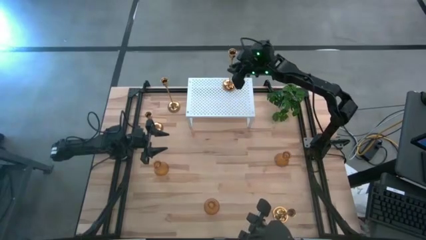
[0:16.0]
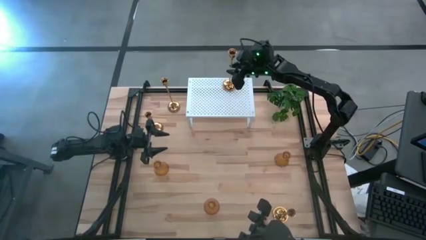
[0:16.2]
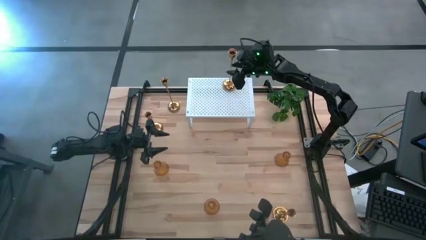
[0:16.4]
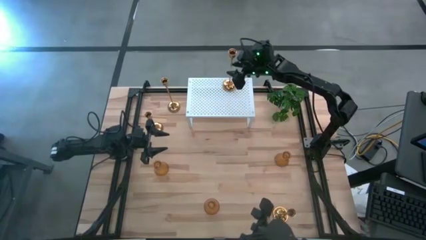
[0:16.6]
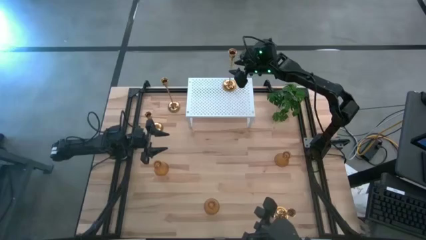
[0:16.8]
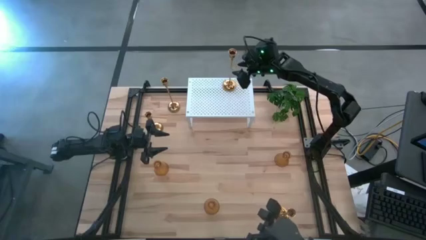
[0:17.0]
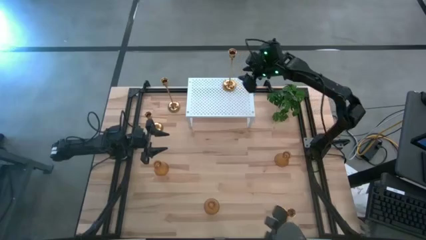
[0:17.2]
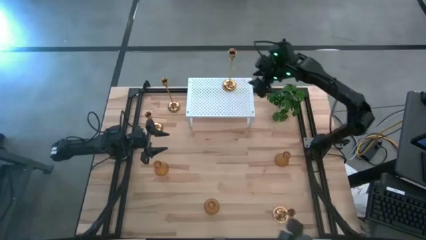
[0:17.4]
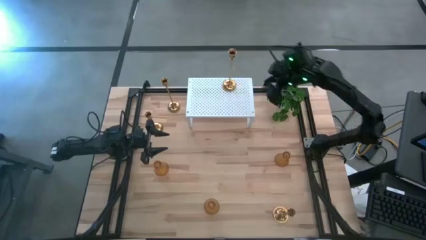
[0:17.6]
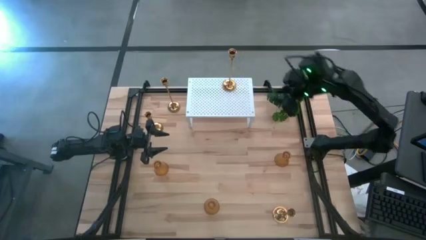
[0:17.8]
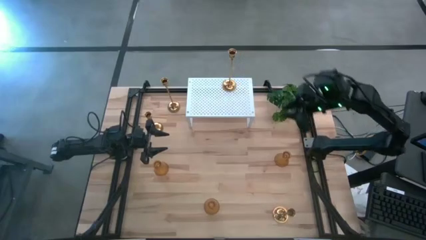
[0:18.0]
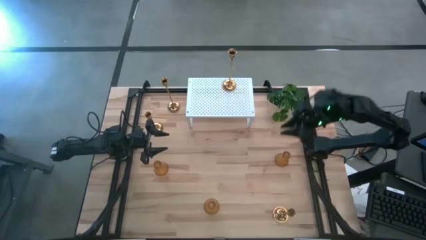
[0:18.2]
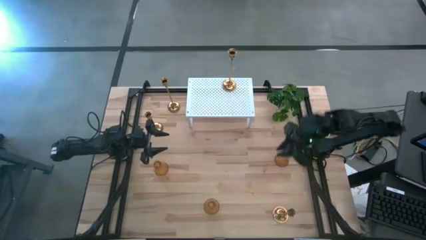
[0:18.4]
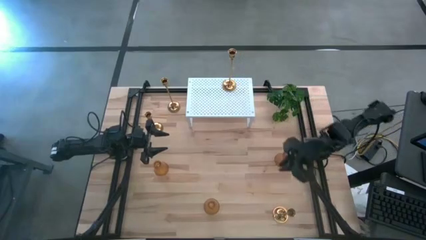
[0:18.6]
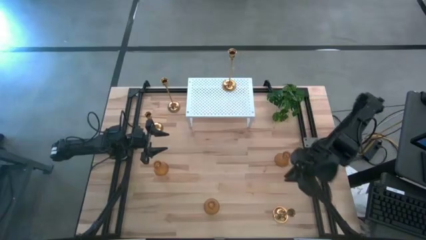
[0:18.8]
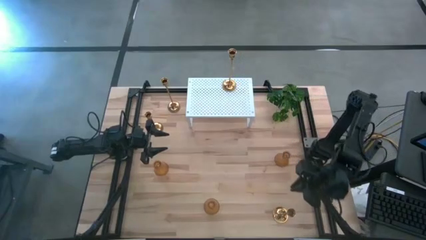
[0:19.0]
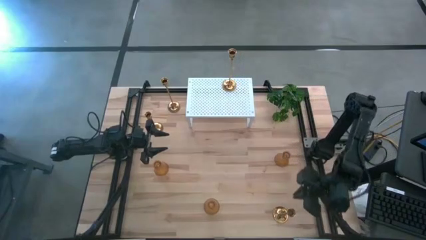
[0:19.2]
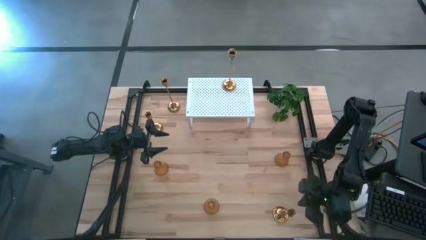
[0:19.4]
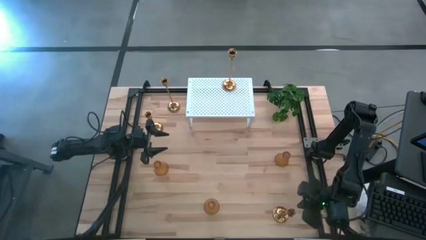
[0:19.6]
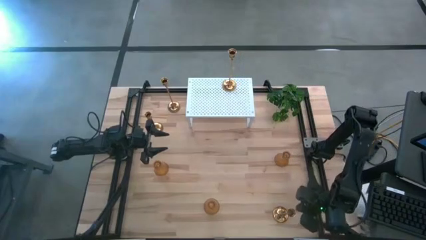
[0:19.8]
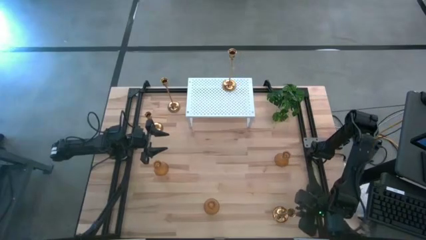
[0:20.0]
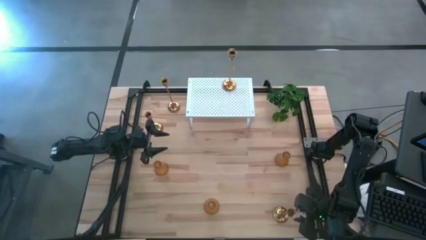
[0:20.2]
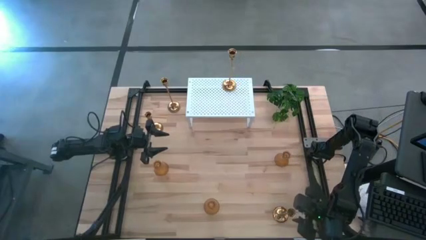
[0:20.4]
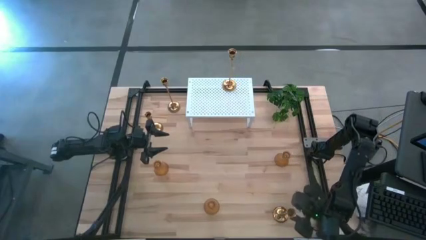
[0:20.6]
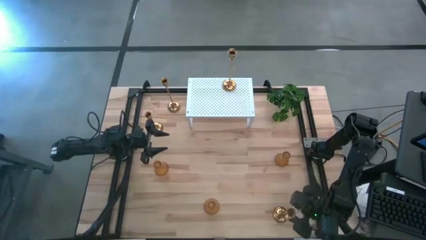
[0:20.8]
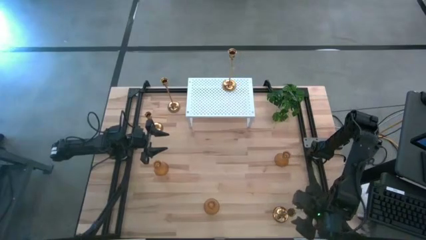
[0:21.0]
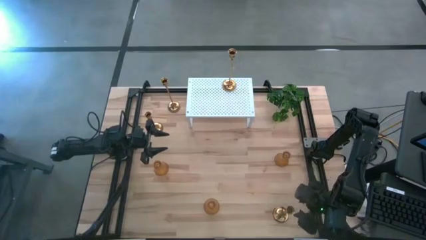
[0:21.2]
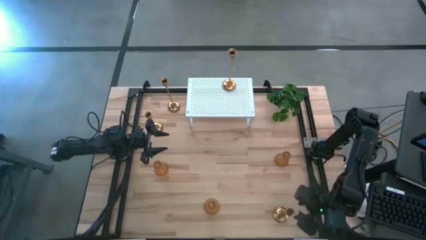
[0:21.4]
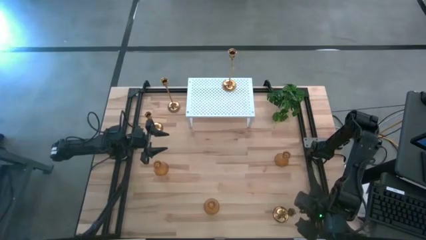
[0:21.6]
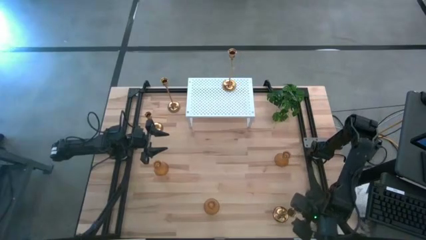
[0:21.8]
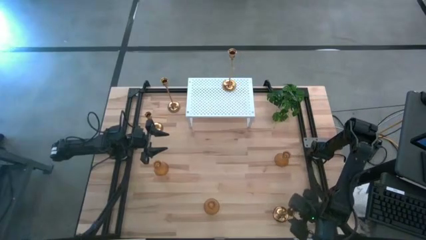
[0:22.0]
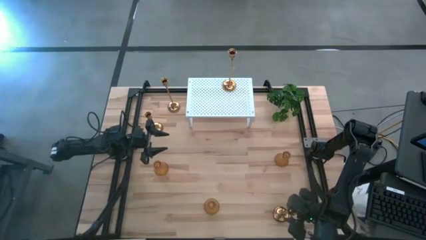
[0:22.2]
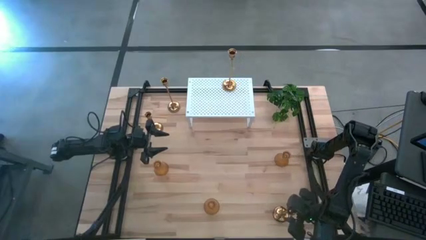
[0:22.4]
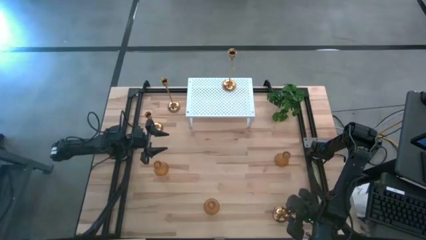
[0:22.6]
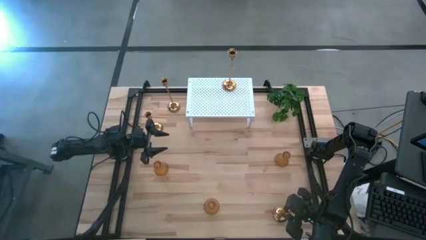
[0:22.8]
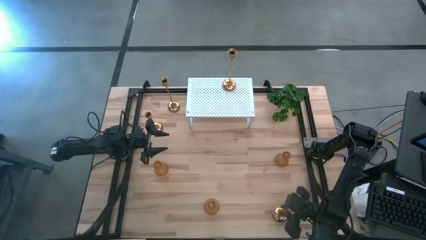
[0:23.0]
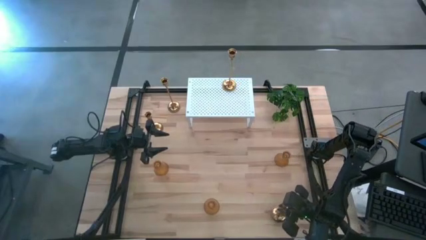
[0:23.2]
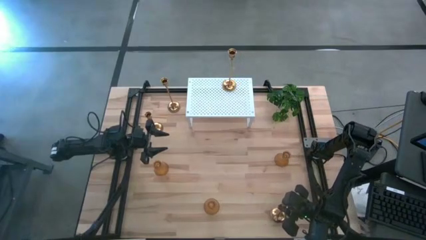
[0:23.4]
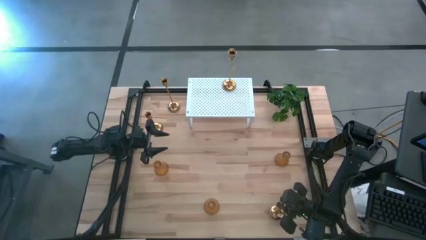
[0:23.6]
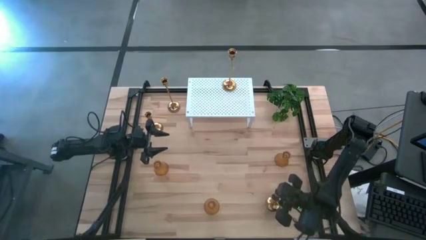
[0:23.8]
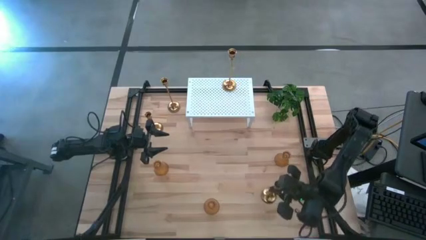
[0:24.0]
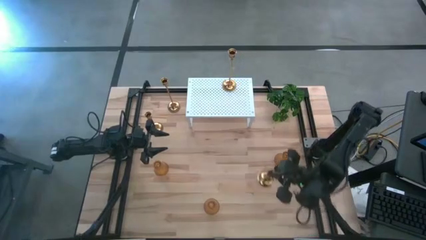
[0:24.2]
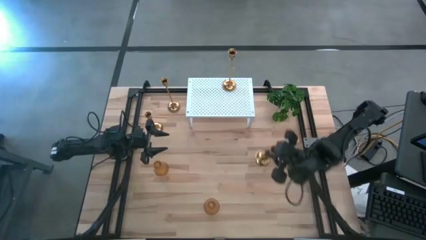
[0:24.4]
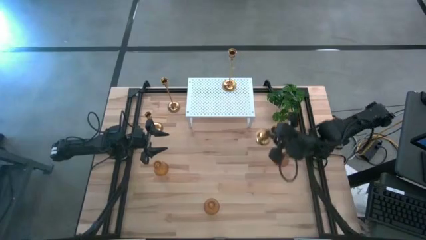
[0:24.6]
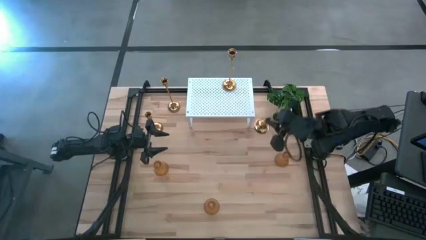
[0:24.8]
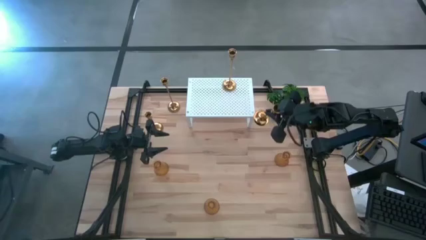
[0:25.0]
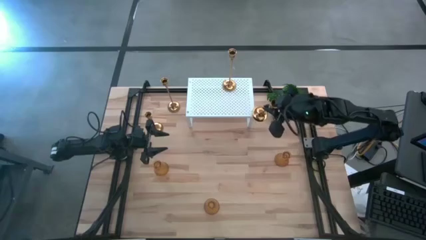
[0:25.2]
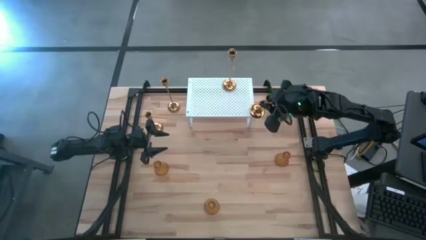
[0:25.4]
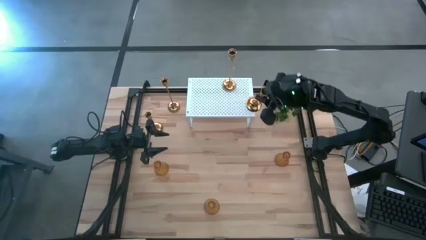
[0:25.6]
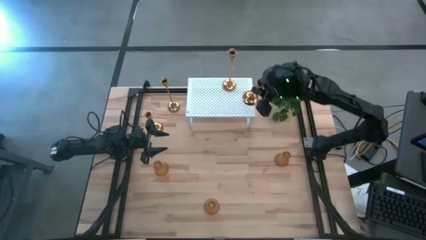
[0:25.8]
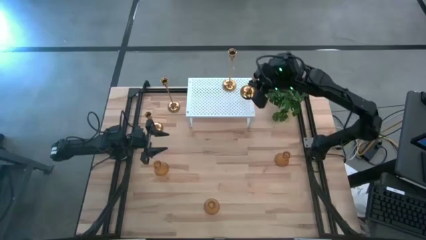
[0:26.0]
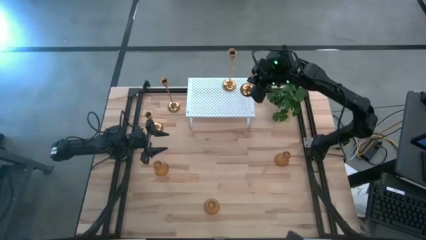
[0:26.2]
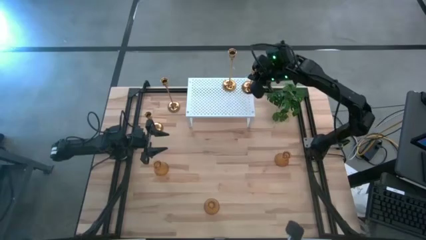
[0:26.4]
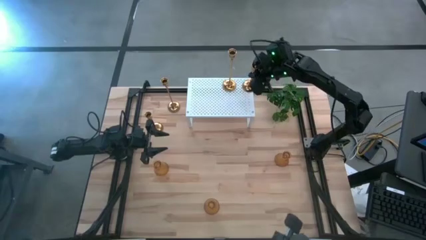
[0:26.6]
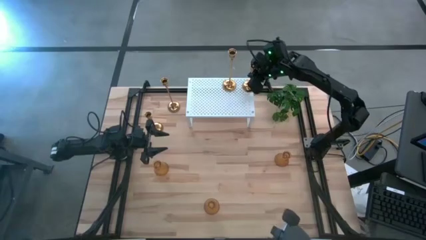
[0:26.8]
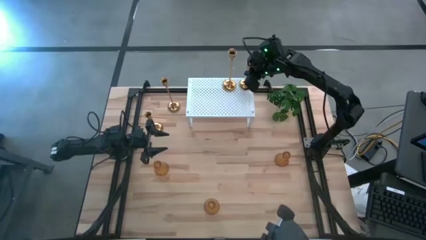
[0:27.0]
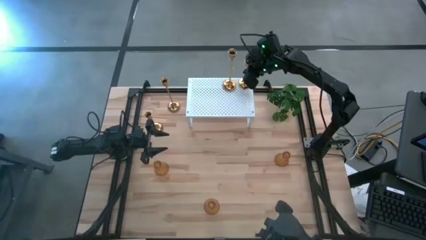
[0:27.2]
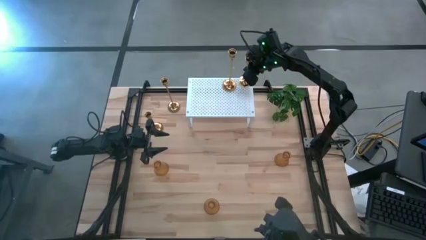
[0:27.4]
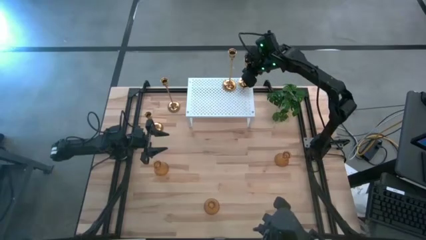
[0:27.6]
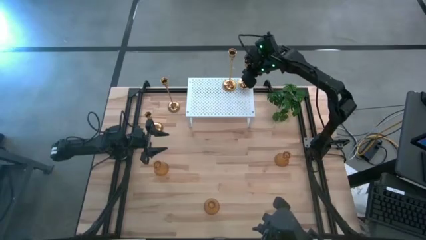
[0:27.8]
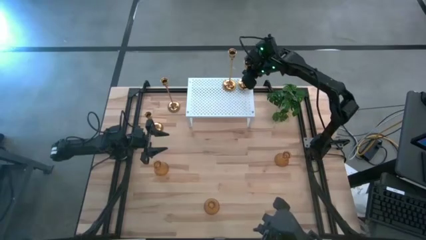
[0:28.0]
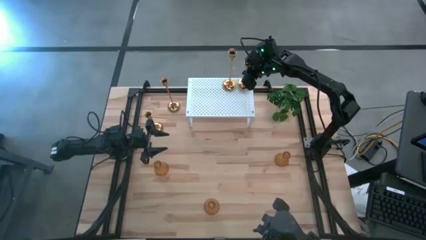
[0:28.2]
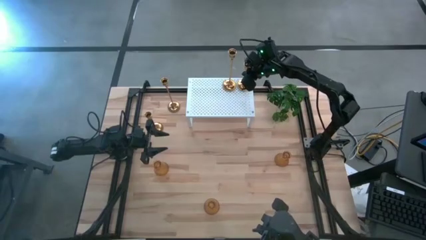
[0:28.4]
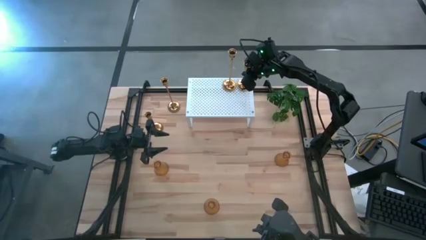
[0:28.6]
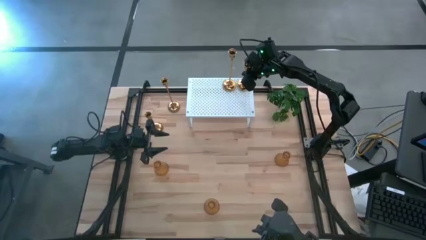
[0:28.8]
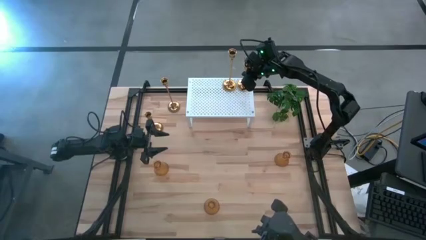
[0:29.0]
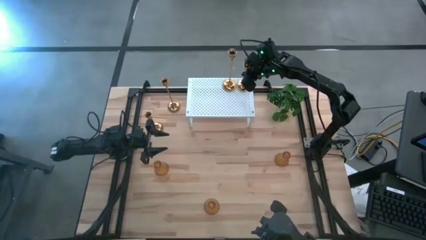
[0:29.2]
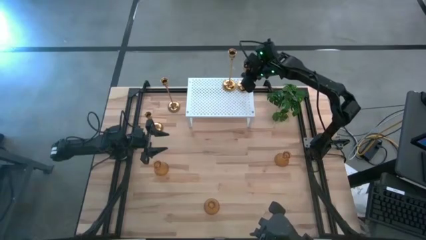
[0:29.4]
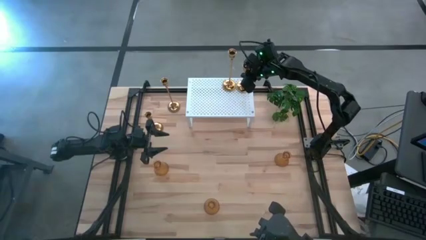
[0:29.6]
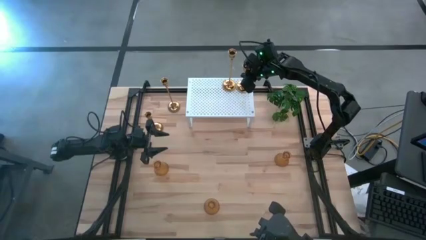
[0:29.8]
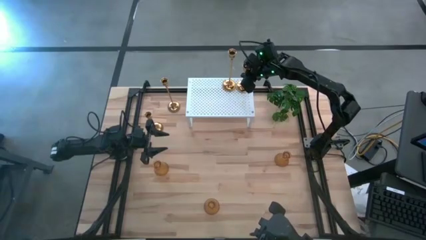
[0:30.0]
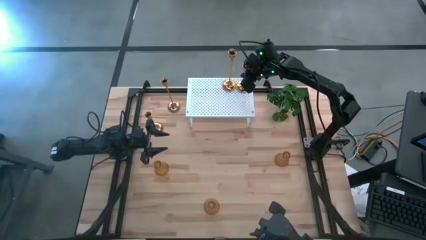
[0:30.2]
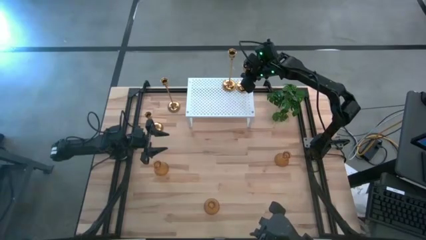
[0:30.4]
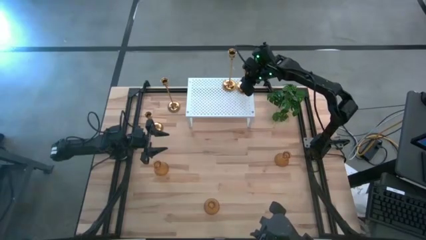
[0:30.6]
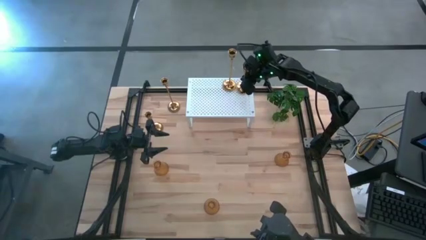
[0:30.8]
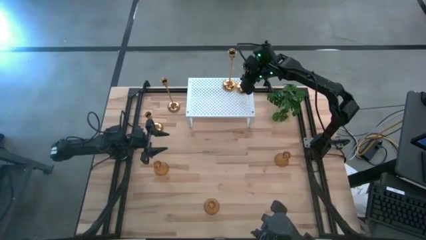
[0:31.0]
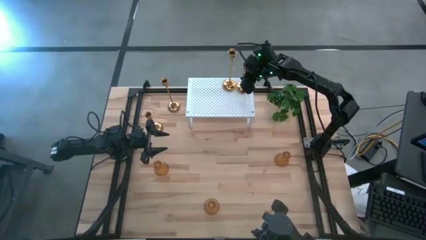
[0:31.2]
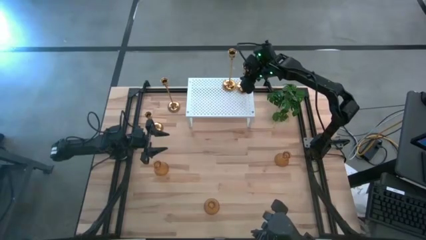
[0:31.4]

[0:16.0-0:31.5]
Task: Pick & Place candle stick holders
Put the small golden candle holder on the shelf
